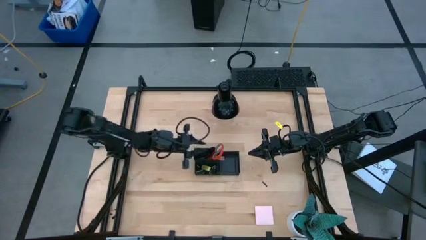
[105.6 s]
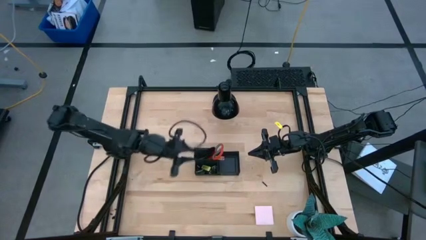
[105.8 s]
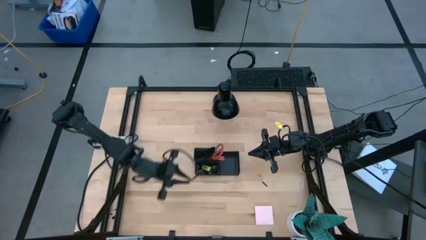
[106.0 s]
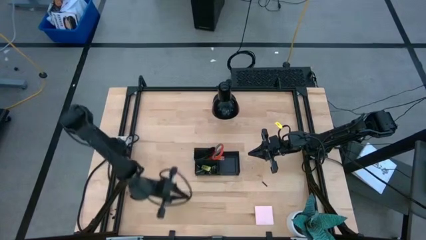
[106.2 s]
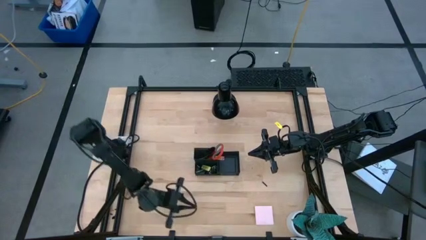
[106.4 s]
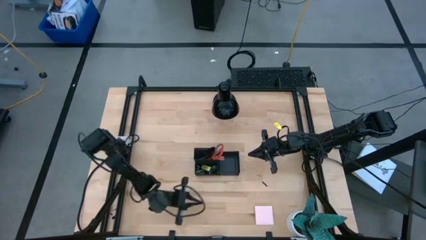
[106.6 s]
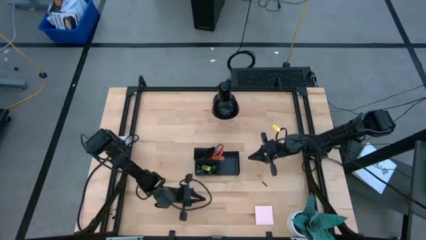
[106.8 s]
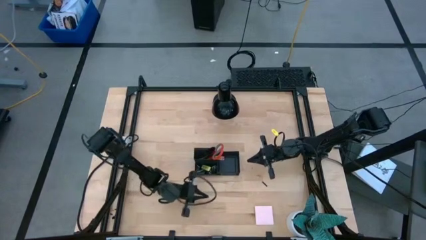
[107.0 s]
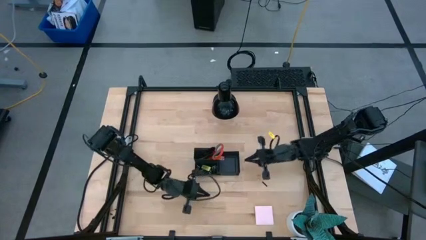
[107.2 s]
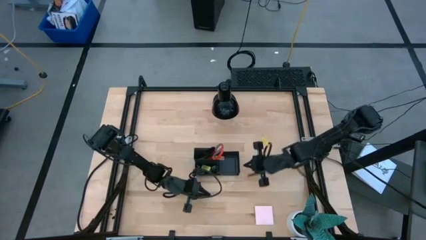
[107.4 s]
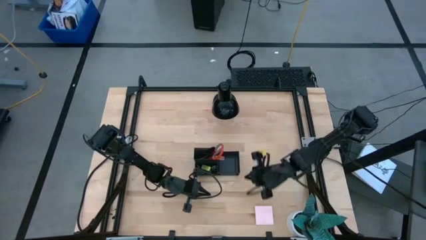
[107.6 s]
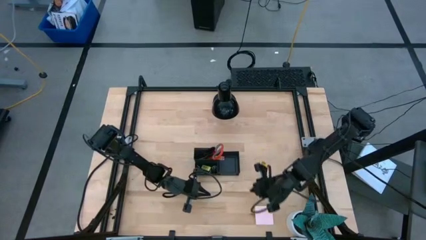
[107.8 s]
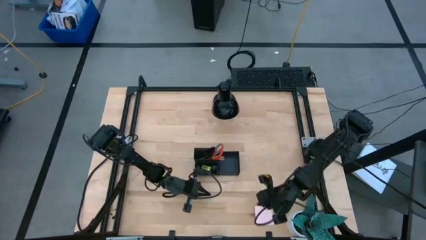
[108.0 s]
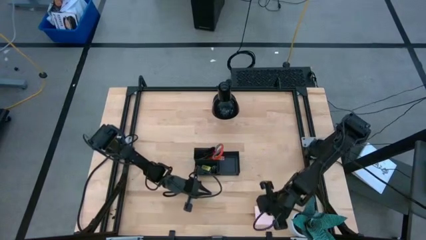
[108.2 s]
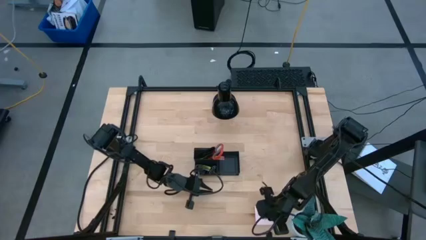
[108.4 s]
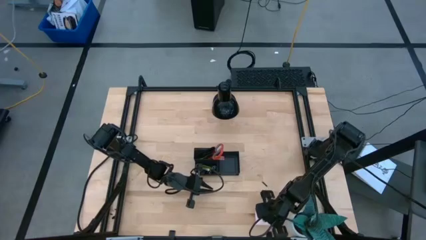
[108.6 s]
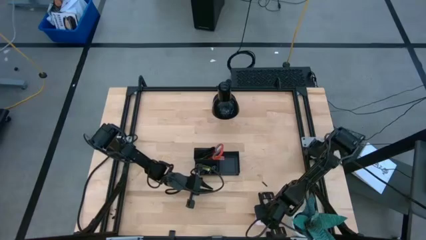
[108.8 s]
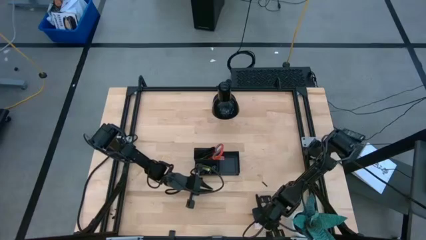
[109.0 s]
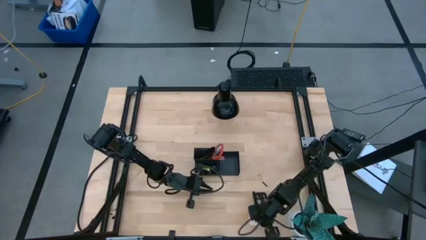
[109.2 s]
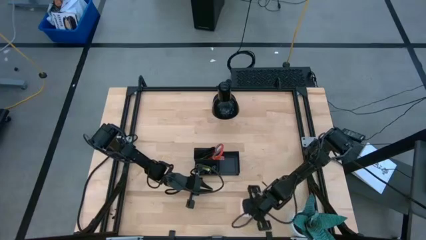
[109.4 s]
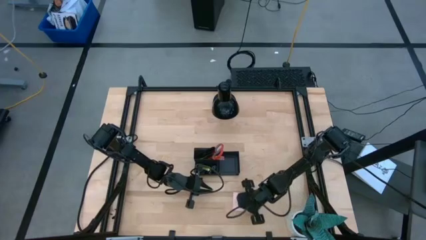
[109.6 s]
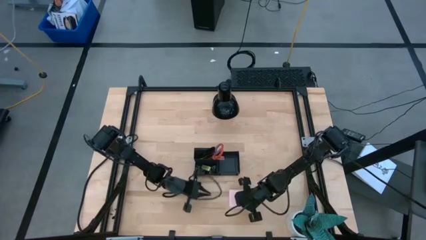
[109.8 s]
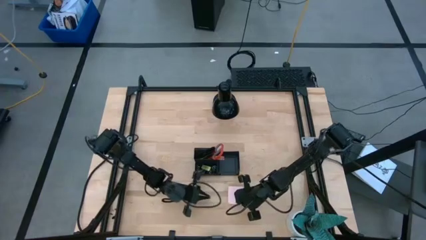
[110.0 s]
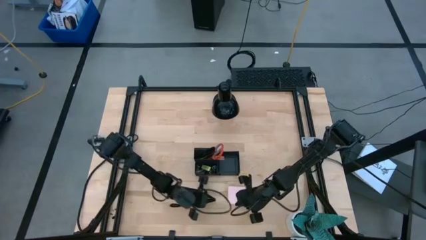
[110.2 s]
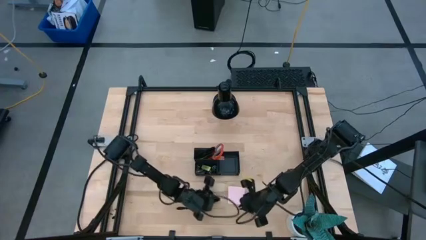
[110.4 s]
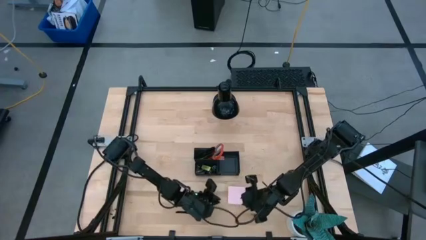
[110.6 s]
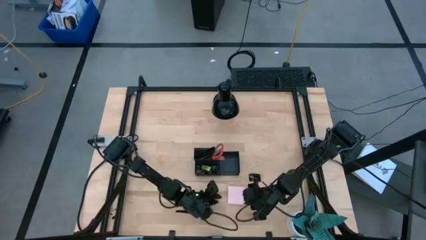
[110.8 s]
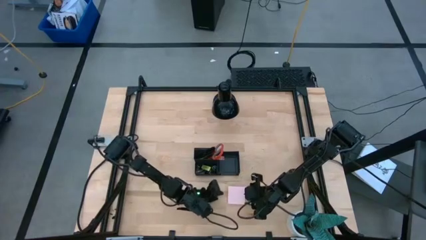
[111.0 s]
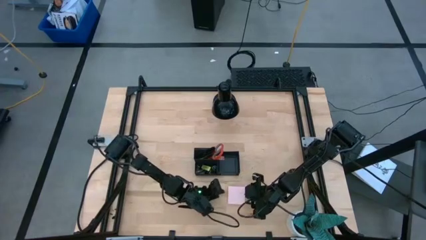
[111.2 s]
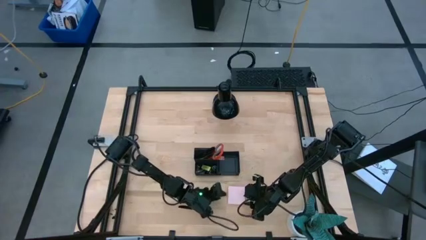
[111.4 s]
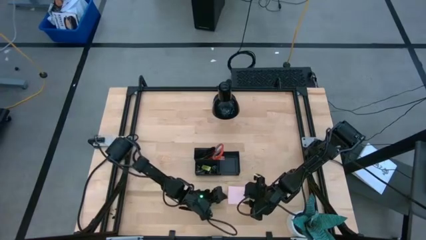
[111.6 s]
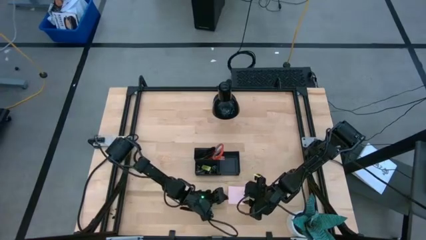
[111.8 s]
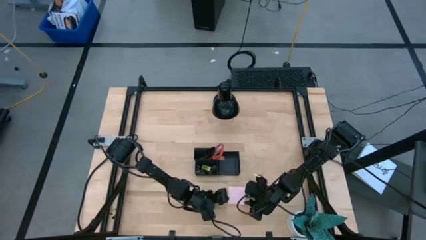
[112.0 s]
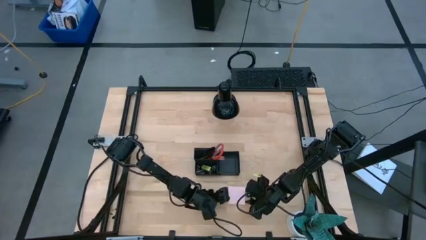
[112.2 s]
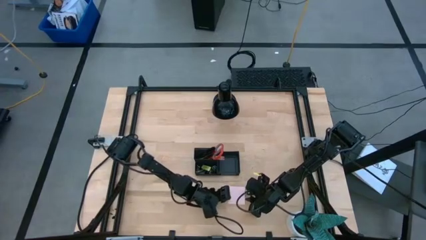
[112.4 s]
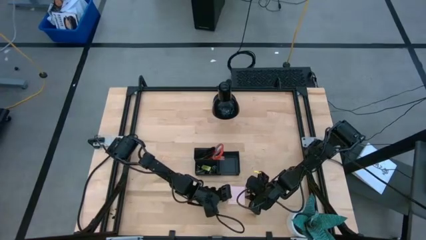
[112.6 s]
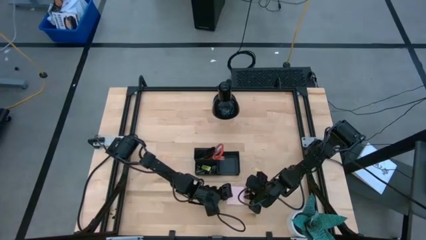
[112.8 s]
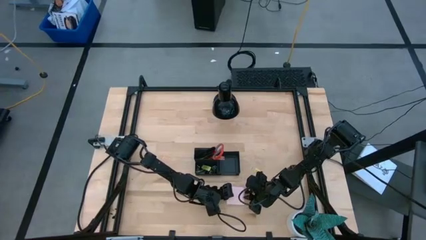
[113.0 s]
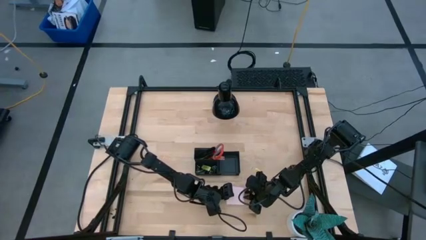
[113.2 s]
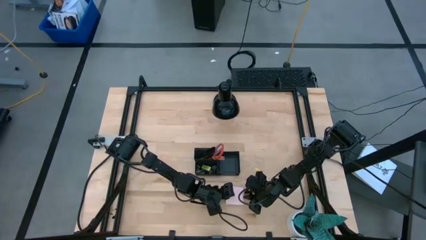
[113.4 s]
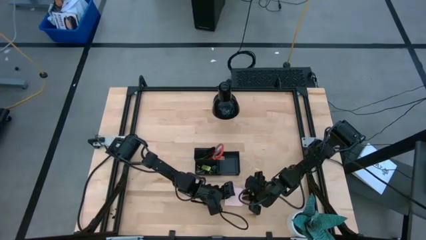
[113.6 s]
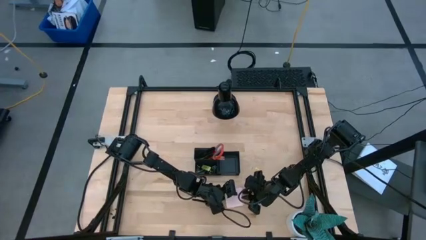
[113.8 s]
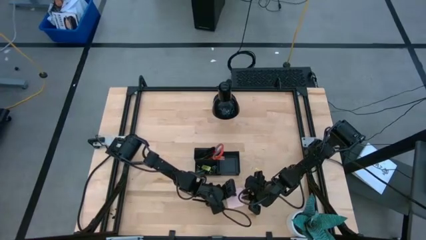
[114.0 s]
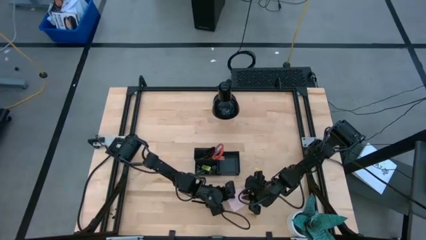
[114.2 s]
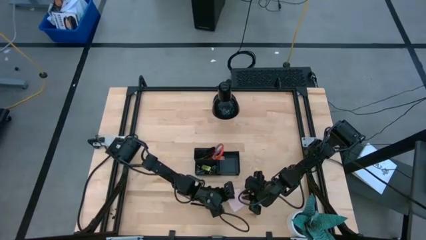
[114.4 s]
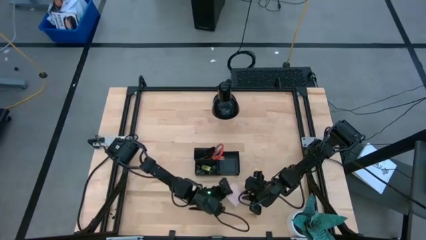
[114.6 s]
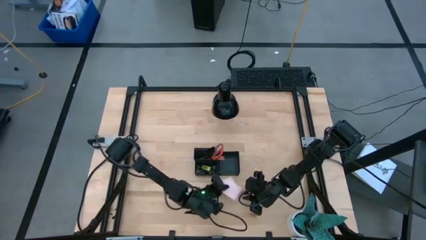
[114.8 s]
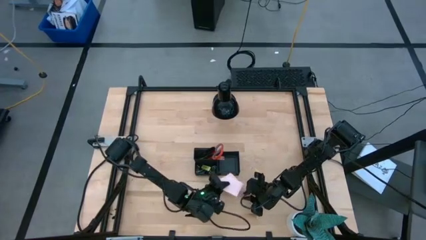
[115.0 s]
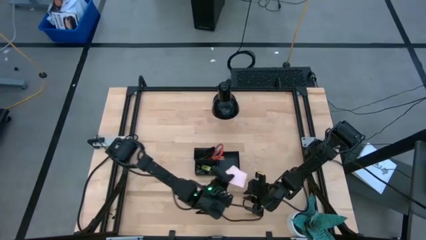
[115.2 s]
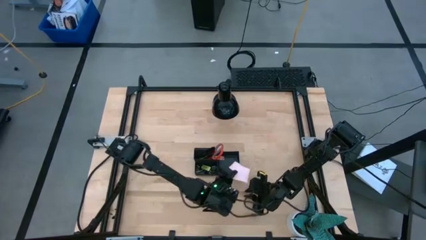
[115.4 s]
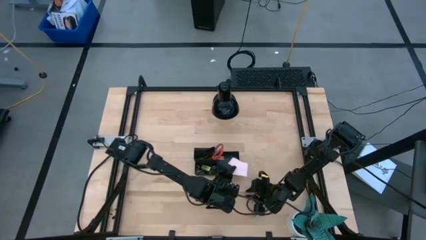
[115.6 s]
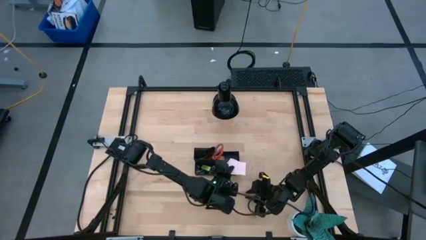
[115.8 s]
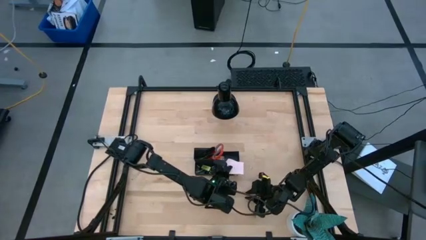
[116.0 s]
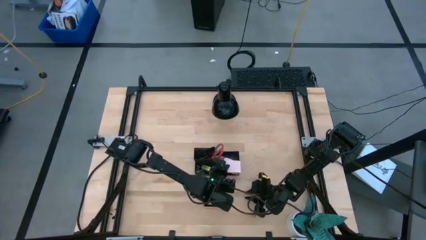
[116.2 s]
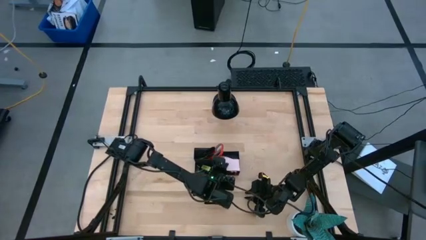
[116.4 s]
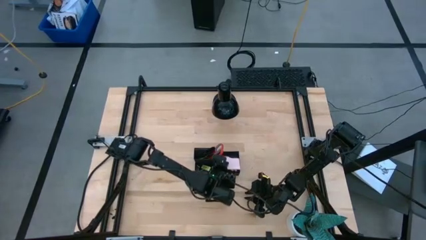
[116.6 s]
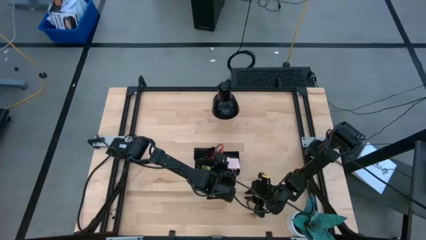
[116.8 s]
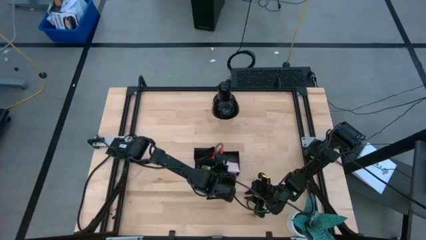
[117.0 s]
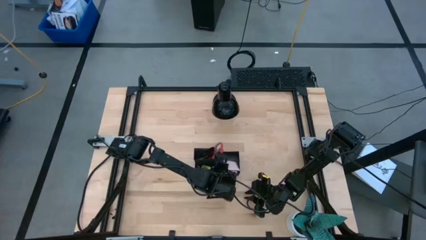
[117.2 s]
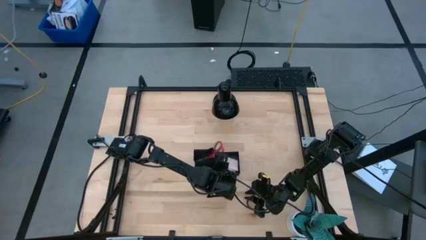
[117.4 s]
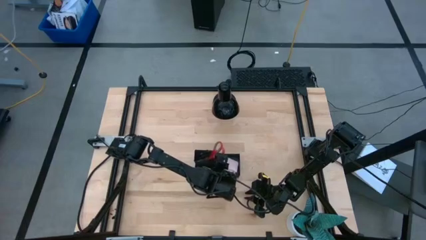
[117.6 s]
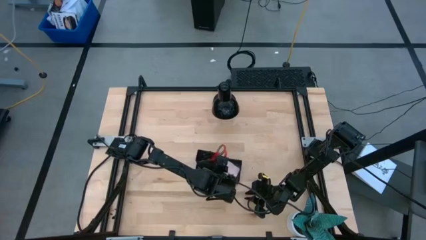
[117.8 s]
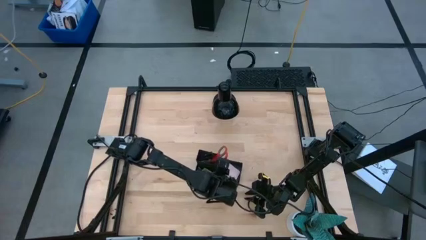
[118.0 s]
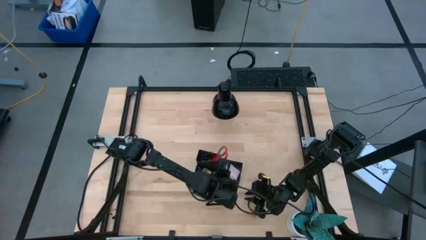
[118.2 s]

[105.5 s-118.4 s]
Task: Pick and place office supplies into organizer
Put the sticky note into the right section of the desk organizer

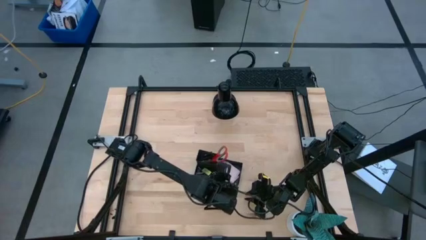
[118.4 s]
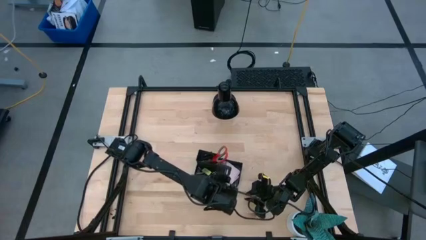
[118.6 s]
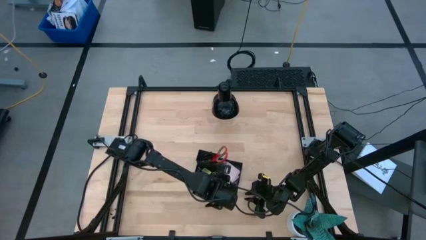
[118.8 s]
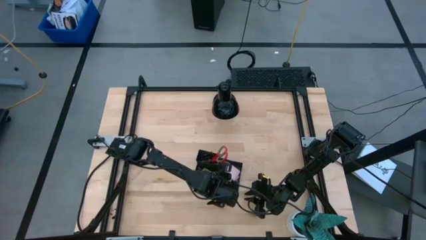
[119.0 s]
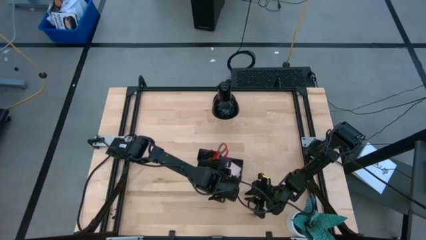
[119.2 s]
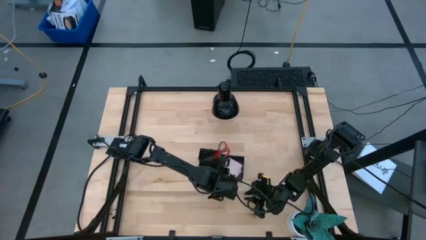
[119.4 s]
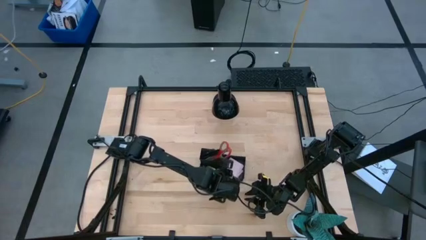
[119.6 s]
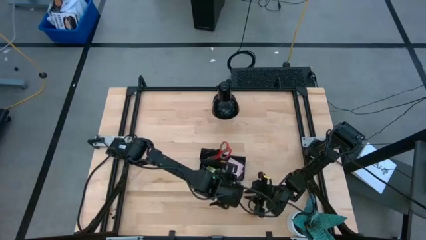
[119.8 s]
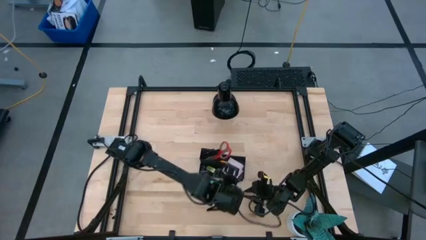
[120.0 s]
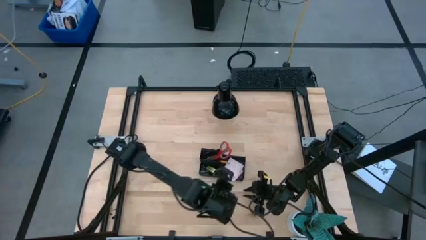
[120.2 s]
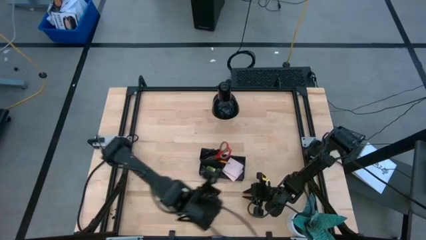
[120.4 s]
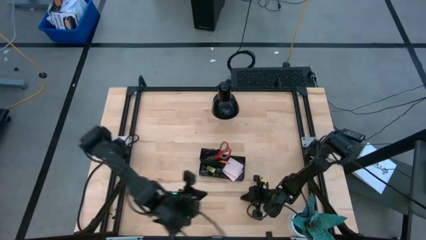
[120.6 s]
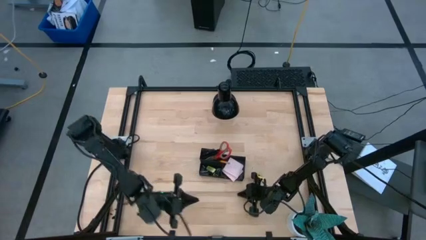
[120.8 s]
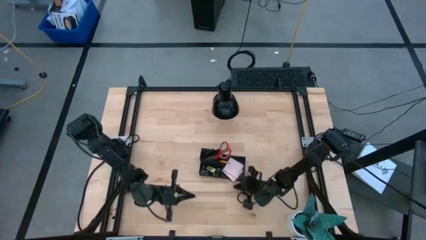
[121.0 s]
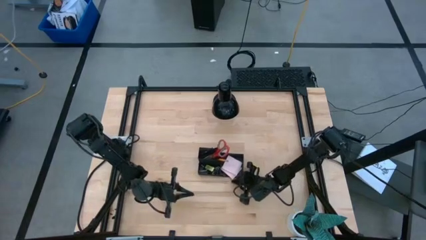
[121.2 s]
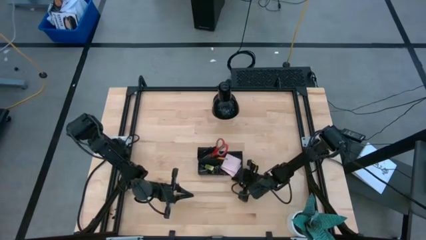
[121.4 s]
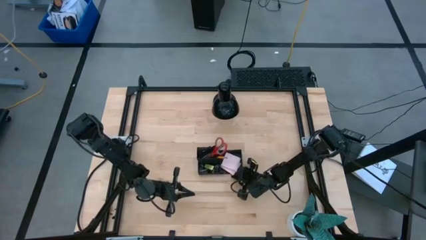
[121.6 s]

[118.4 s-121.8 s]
Adjust the desk organizer
